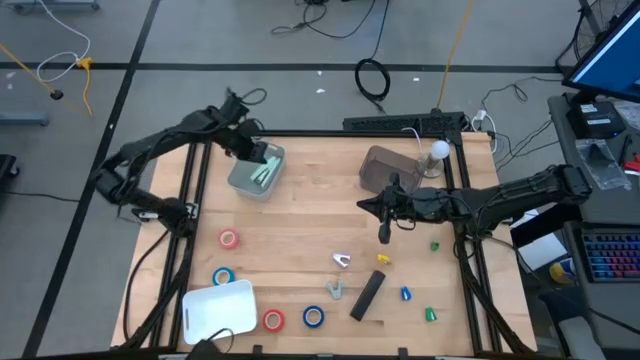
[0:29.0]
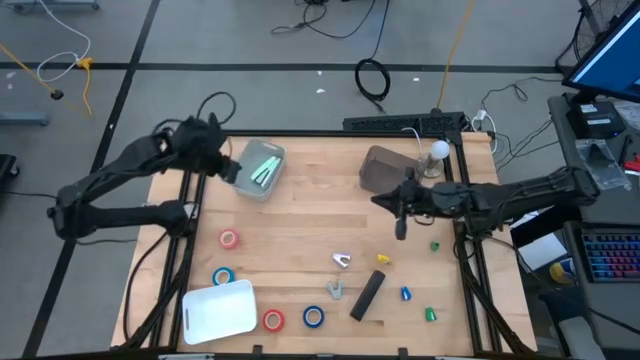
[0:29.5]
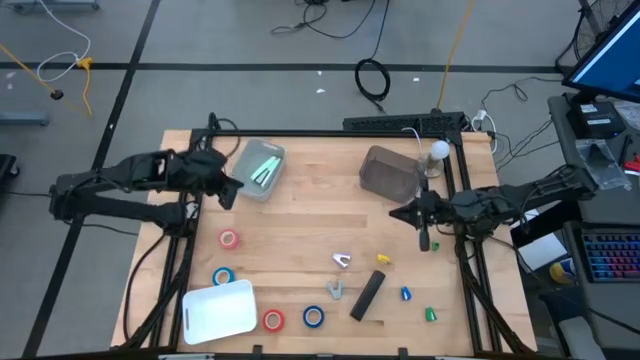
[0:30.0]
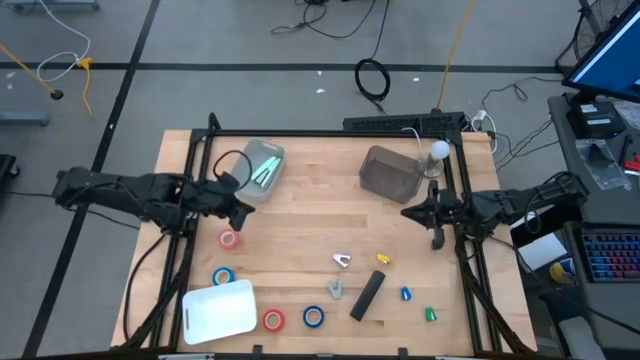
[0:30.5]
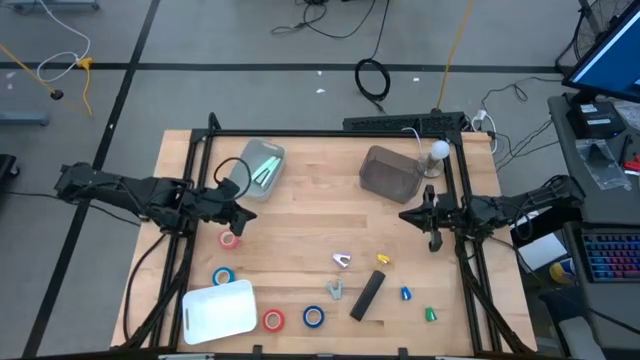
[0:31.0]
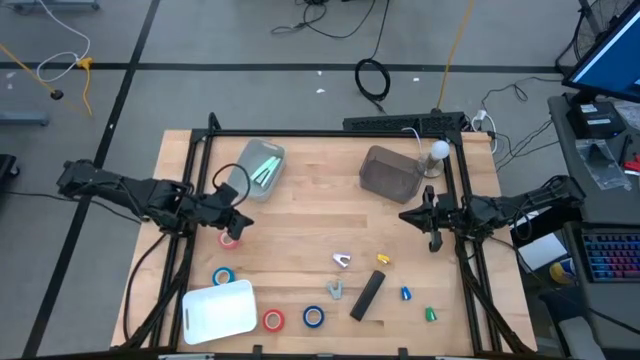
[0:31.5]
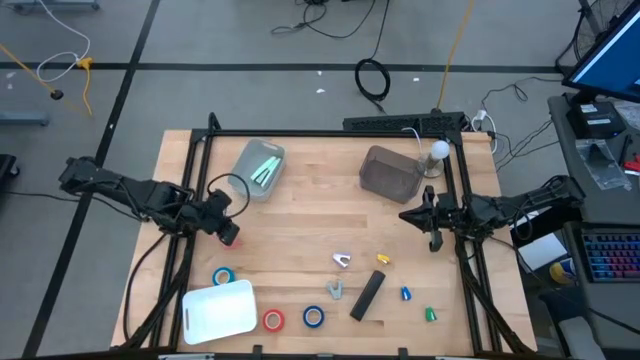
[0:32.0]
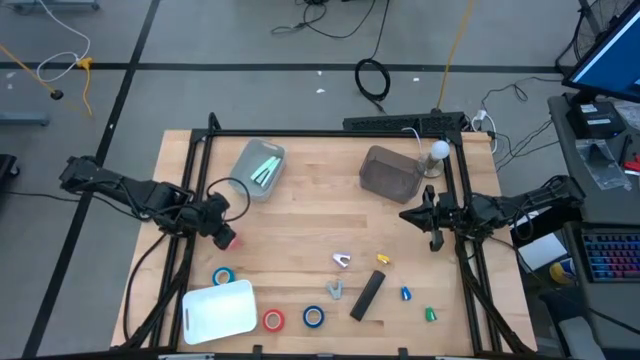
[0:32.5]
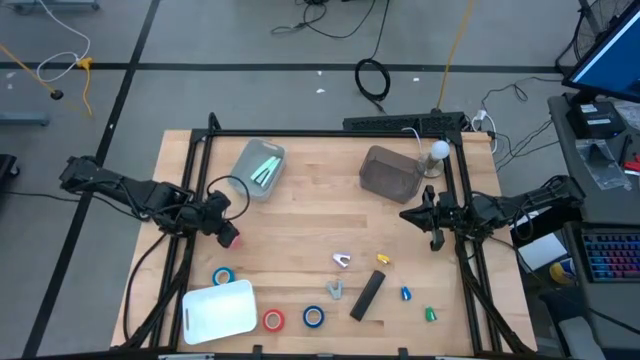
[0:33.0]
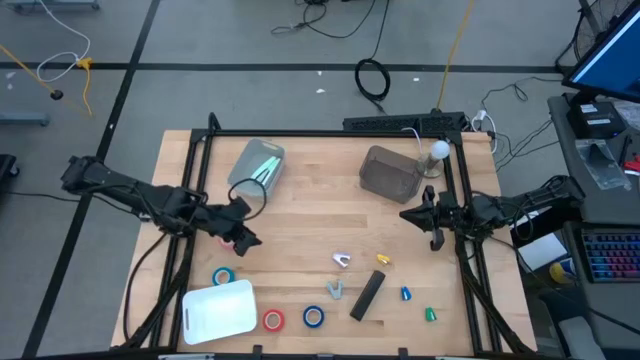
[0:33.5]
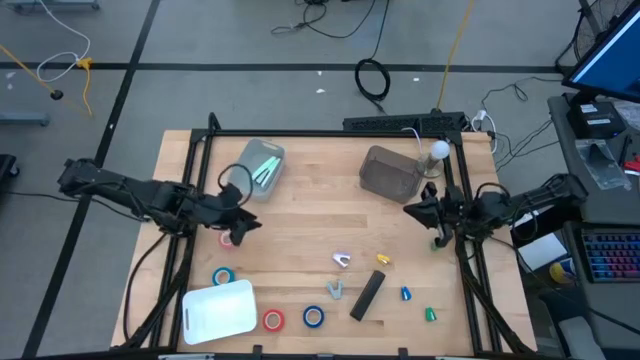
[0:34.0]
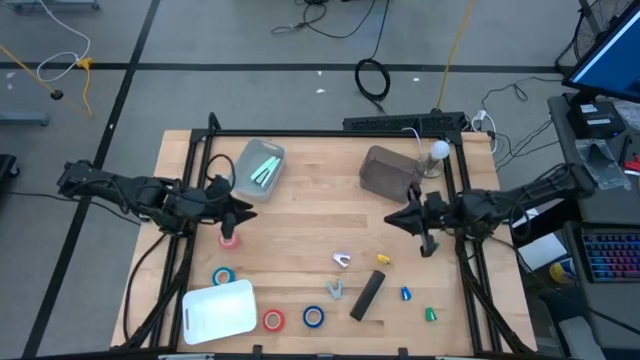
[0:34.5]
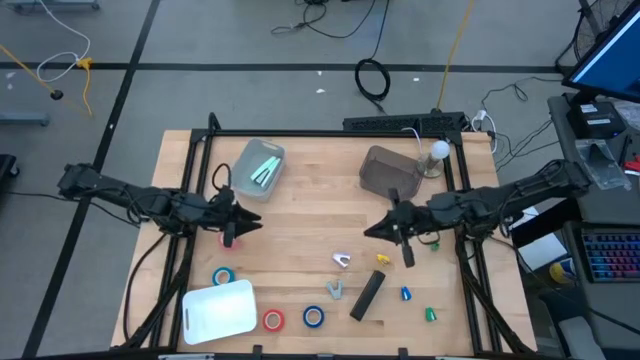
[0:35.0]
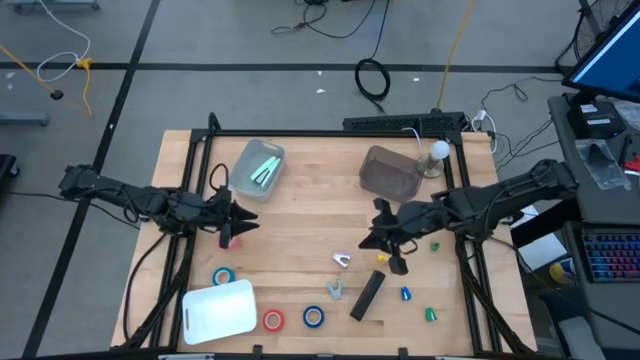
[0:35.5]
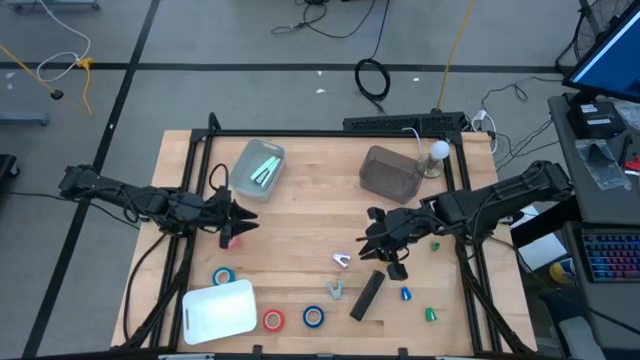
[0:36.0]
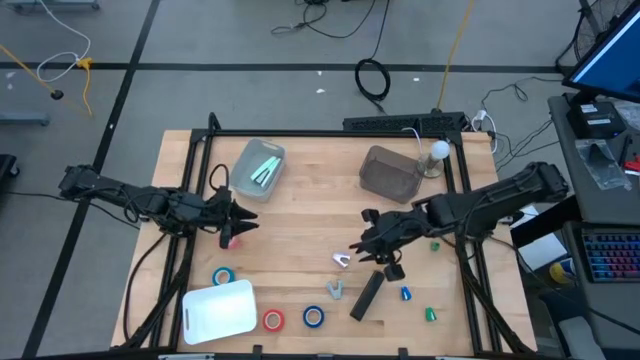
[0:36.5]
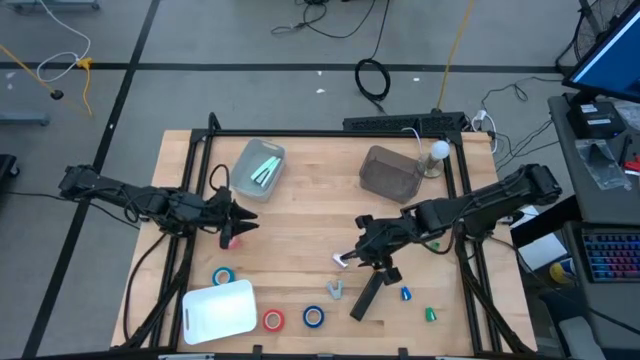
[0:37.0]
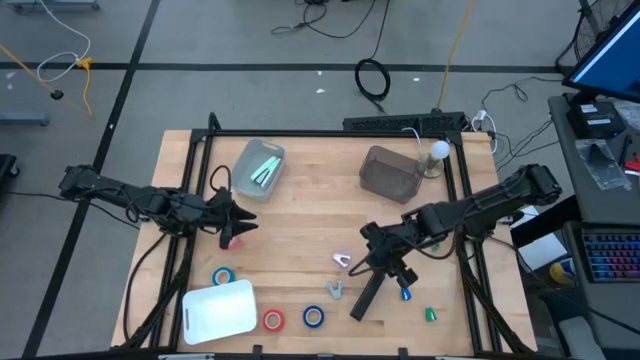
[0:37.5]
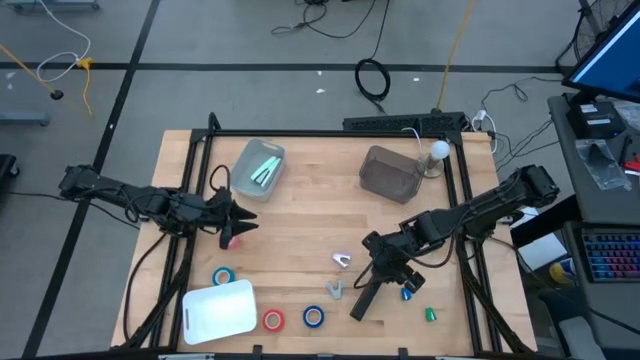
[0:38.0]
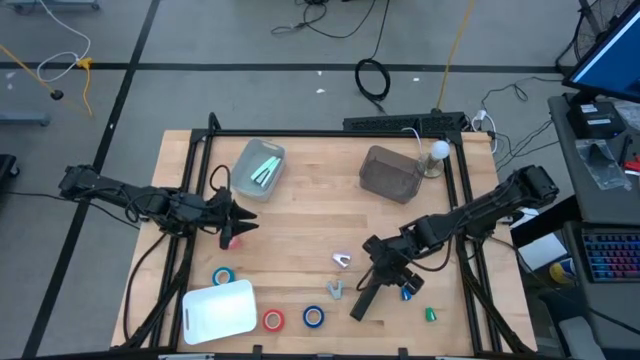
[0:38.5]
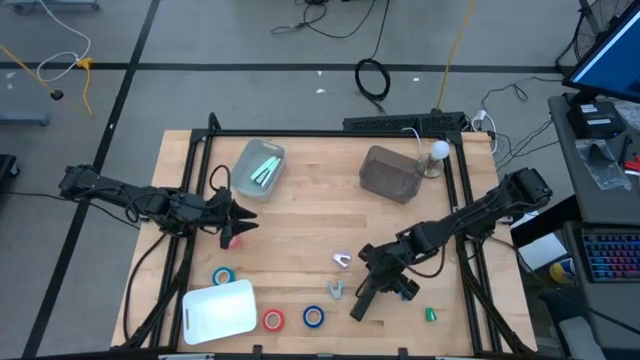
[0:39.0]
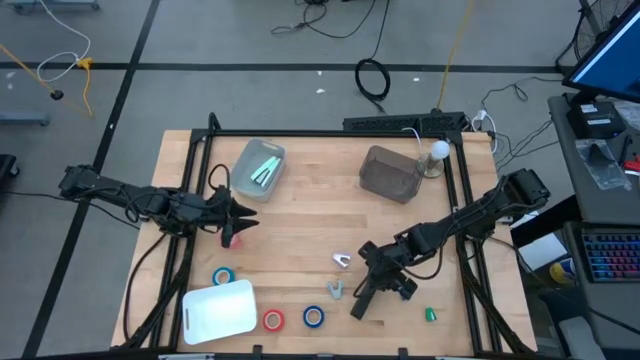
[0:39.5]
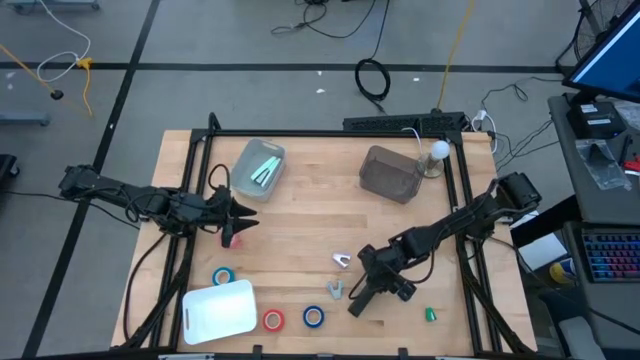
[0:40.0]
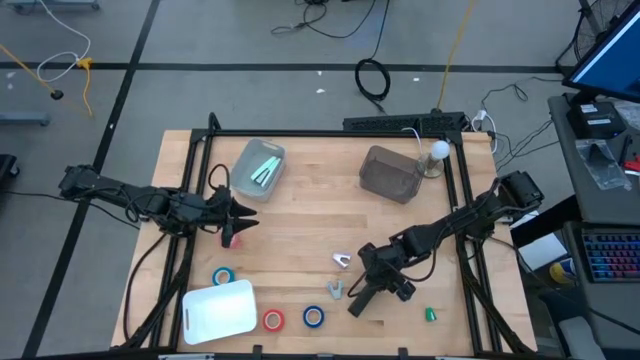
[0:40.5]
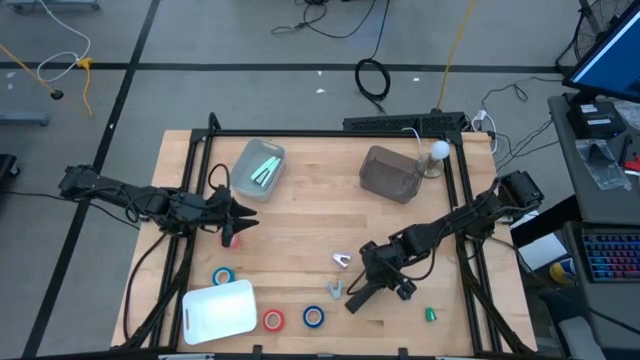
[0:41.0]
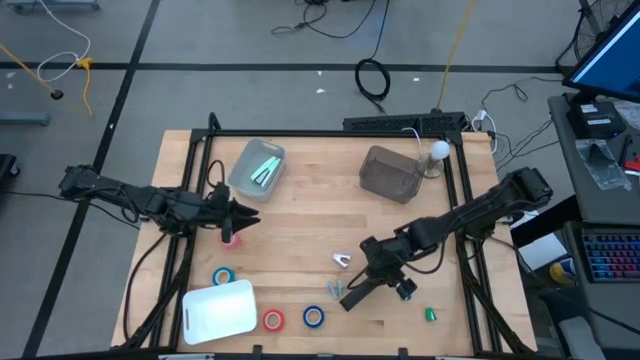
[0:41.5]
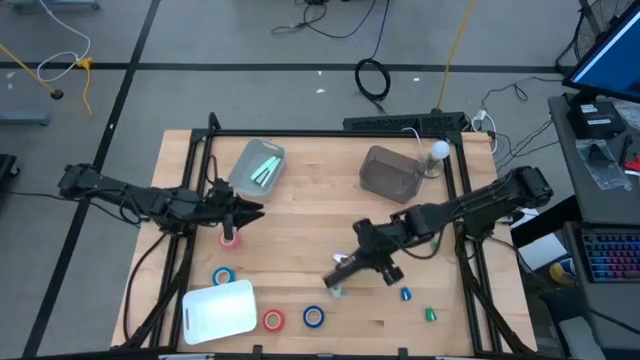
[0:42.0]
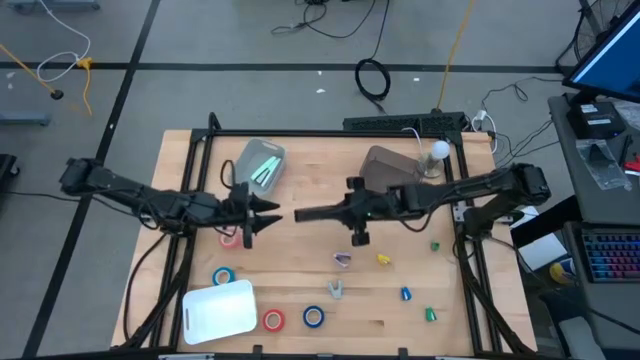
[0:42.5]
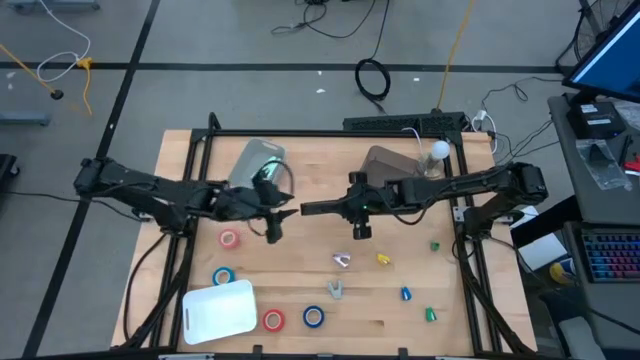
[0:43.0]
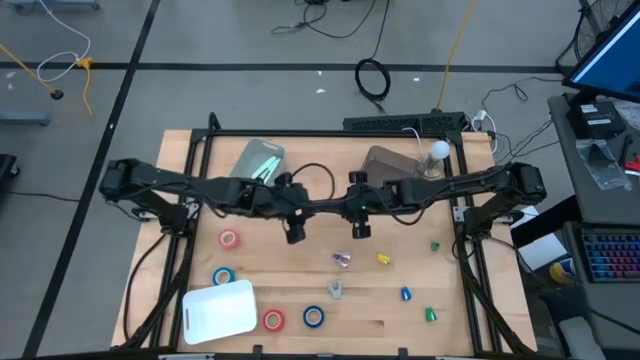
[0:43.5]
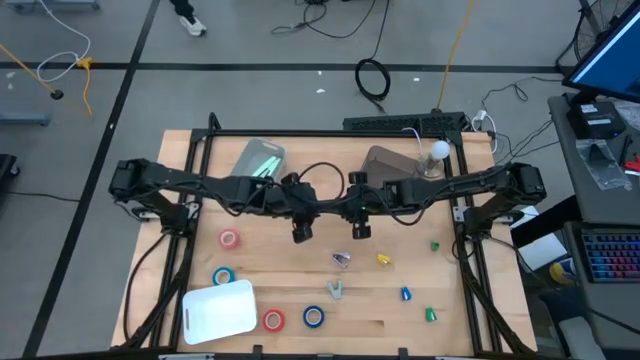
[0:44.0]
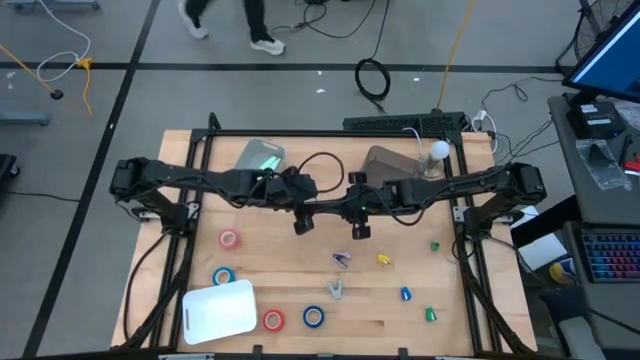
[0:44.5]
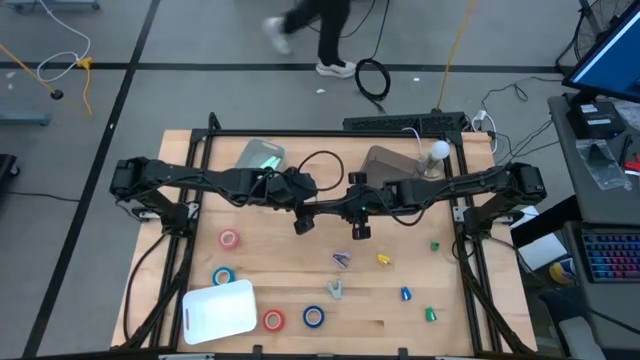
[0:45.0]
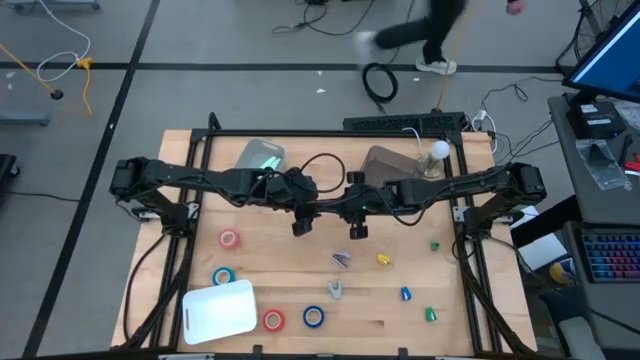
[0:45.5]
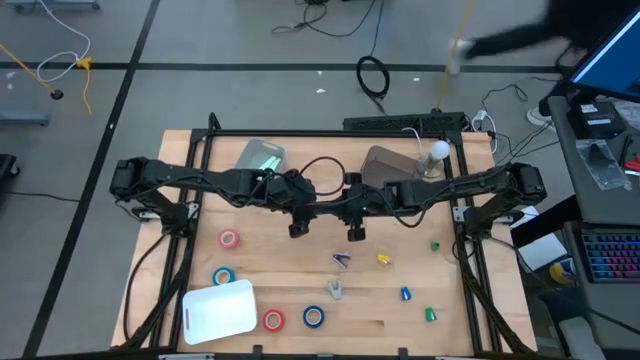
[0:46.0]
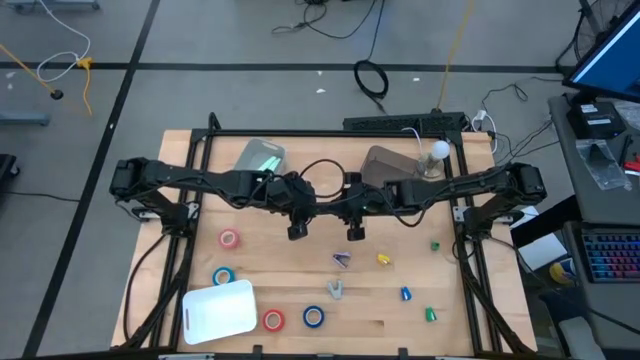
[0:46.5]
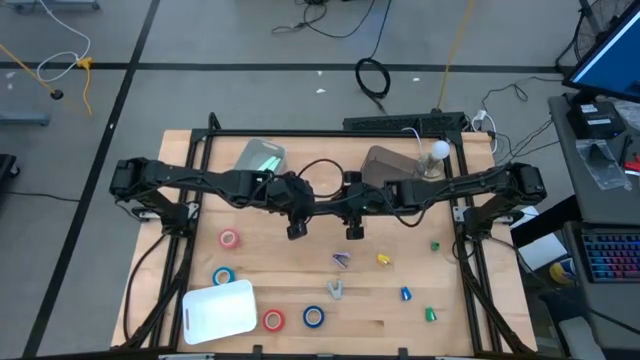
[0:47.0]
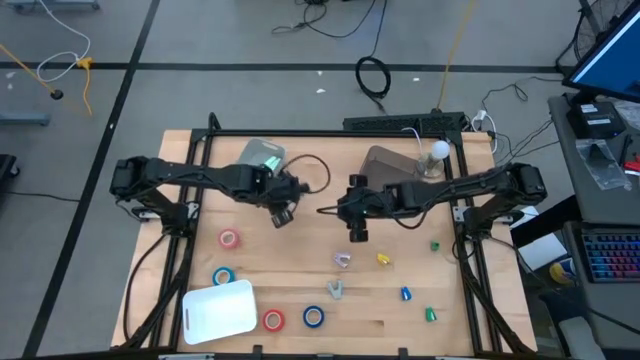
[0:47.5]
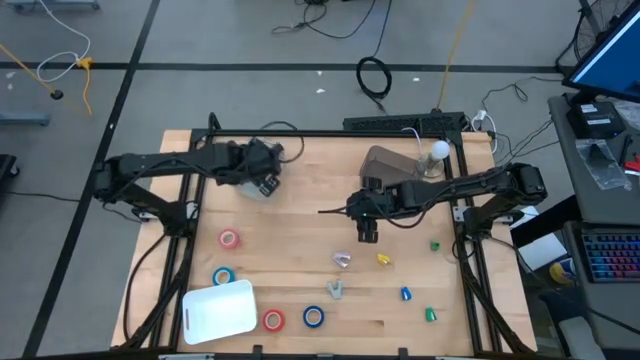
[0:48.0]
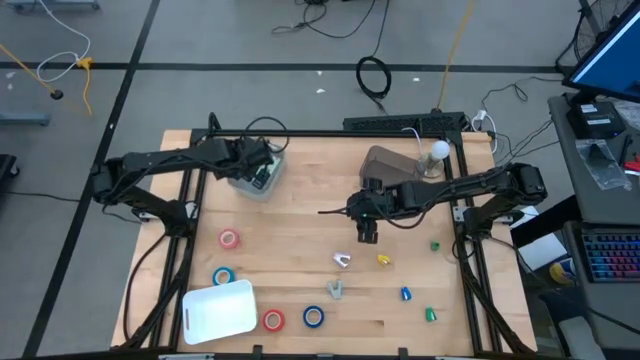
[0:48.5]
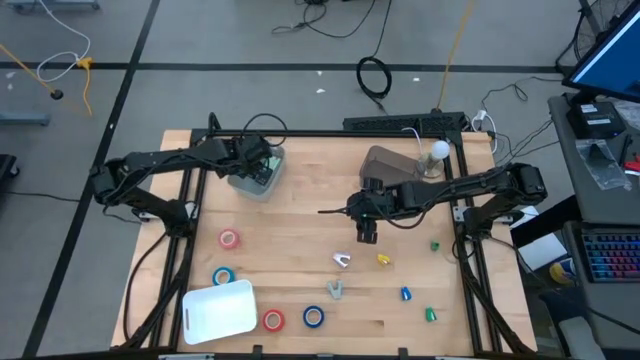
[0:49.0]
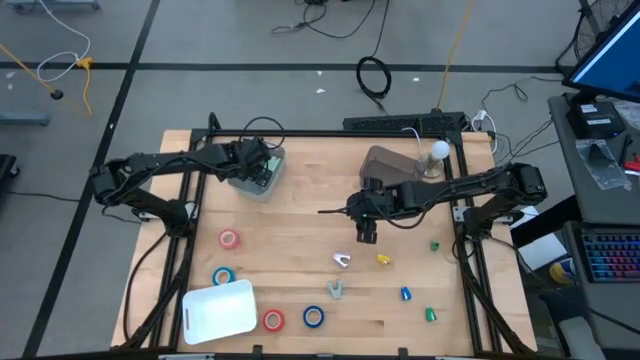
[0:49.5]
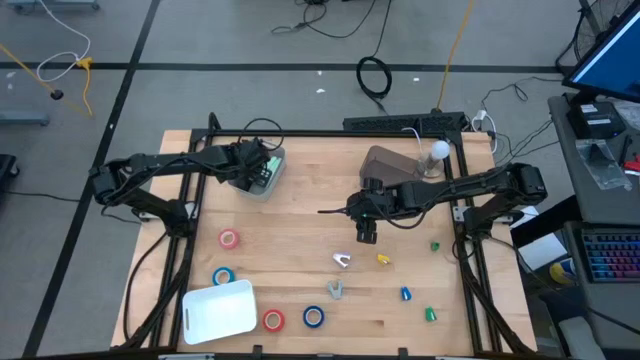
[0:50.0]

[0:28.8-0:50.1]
Task: Pick and place Stapler, Stapler remover, tape
Put the black stapler into the gray bin
